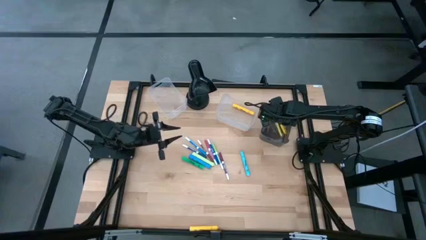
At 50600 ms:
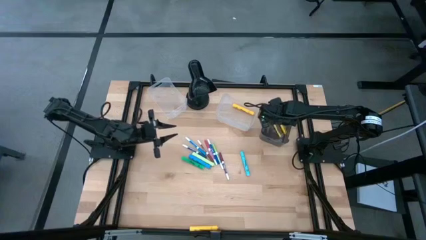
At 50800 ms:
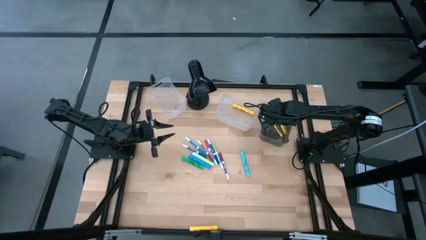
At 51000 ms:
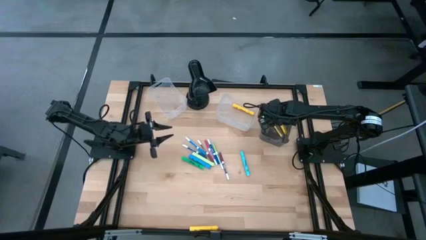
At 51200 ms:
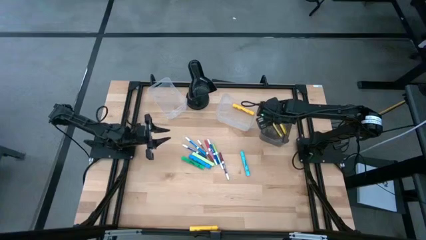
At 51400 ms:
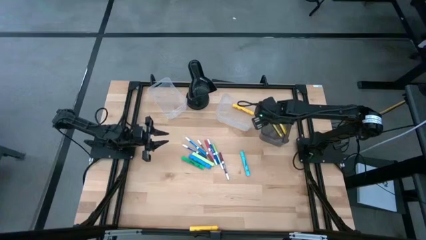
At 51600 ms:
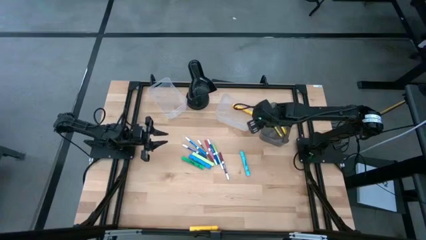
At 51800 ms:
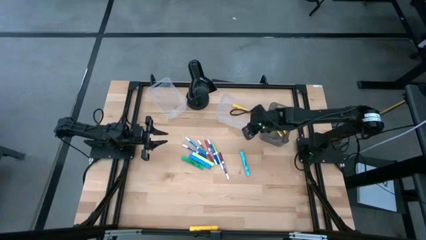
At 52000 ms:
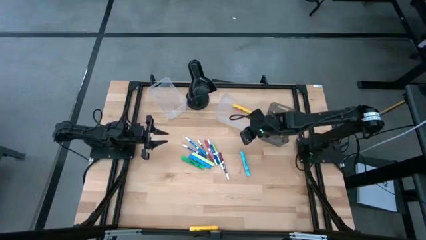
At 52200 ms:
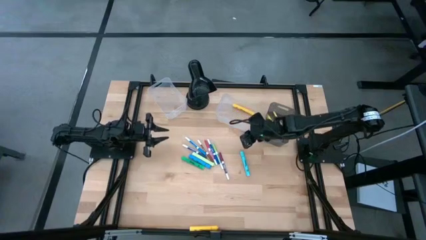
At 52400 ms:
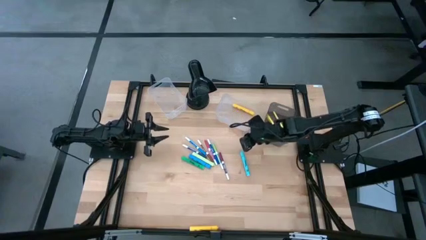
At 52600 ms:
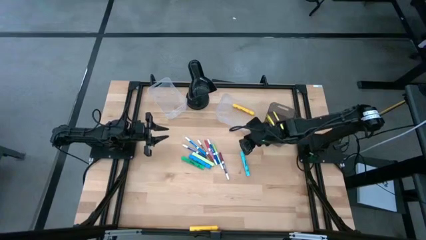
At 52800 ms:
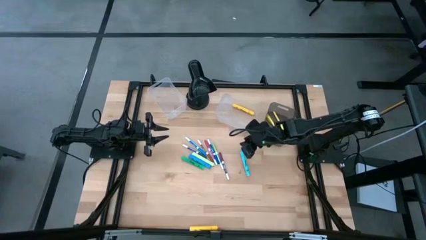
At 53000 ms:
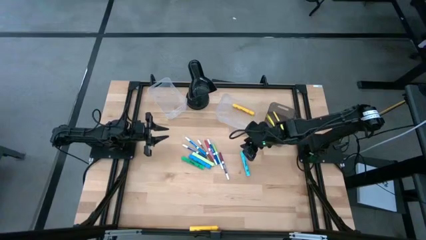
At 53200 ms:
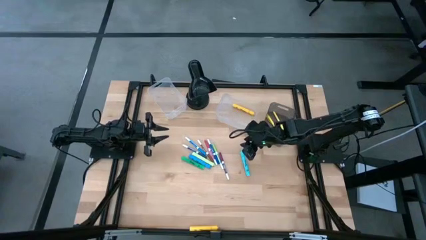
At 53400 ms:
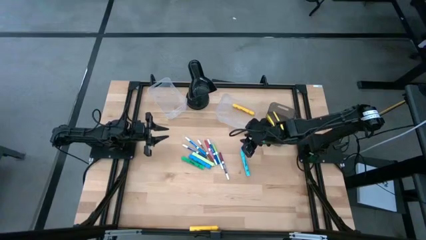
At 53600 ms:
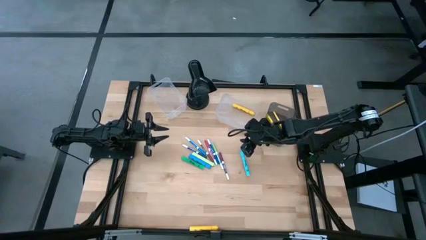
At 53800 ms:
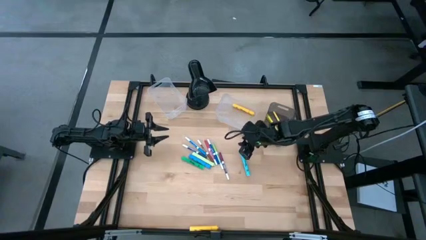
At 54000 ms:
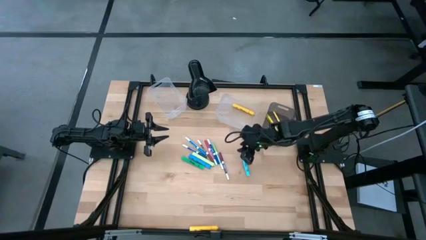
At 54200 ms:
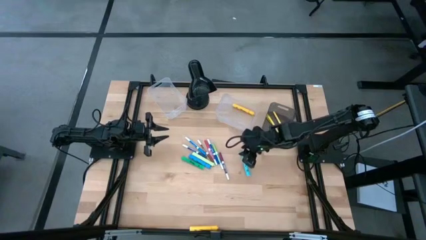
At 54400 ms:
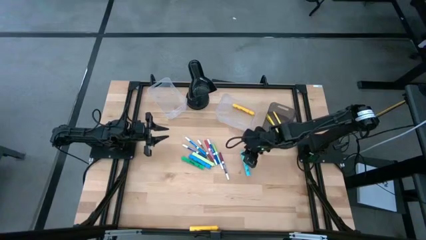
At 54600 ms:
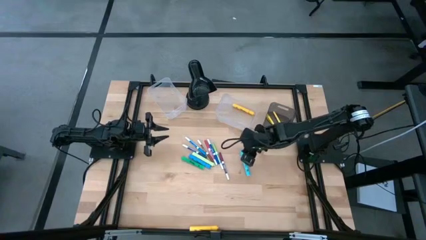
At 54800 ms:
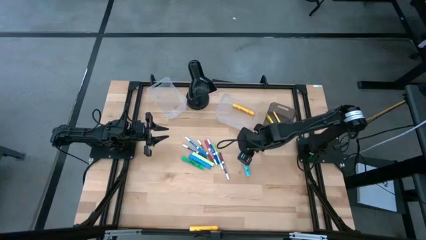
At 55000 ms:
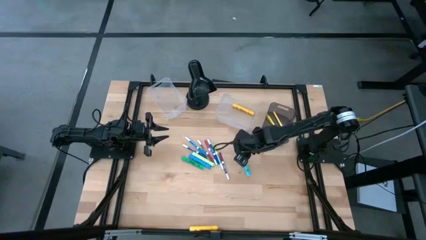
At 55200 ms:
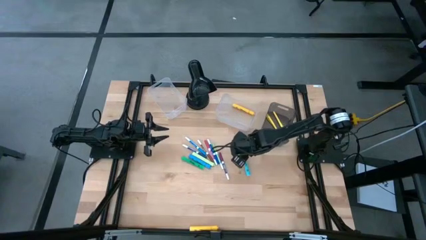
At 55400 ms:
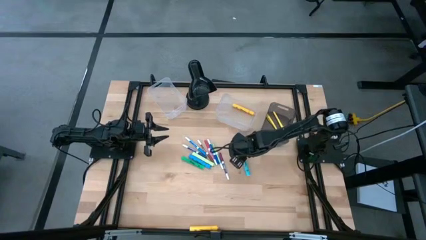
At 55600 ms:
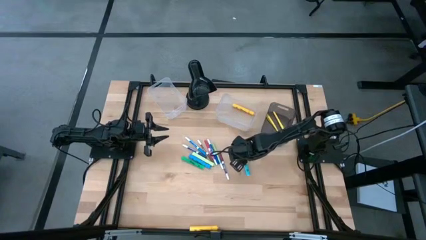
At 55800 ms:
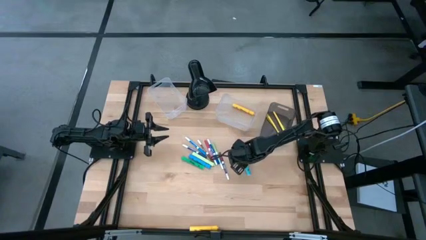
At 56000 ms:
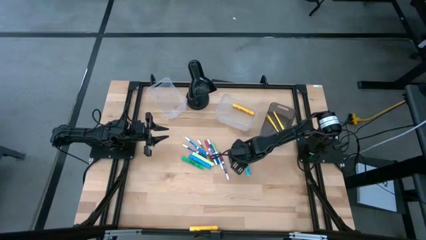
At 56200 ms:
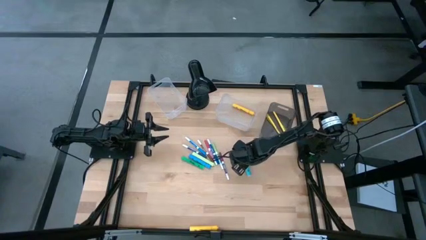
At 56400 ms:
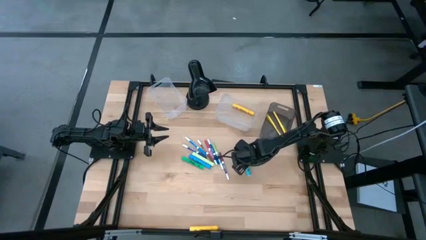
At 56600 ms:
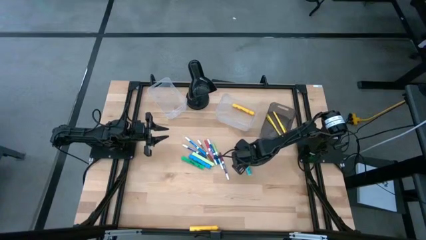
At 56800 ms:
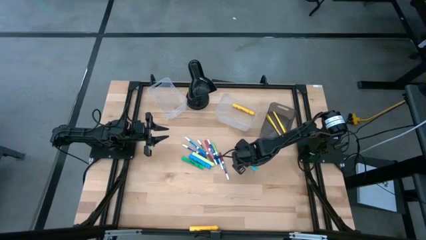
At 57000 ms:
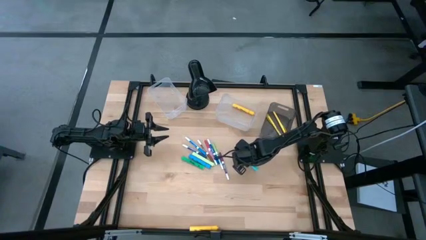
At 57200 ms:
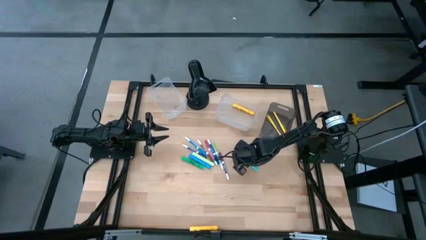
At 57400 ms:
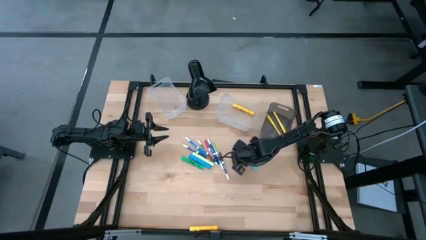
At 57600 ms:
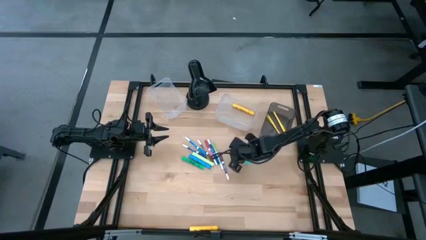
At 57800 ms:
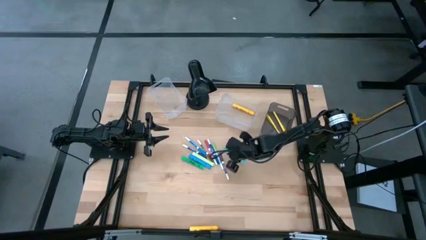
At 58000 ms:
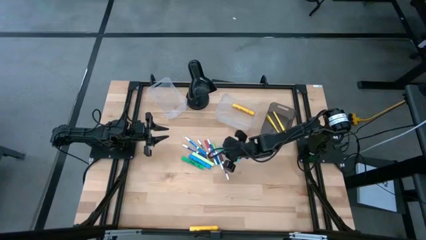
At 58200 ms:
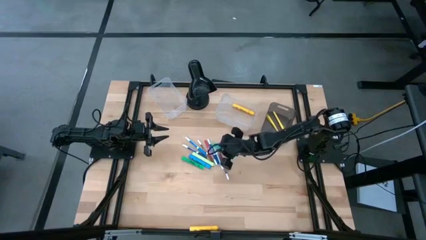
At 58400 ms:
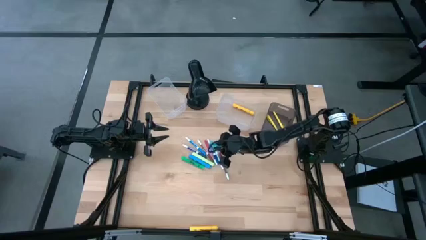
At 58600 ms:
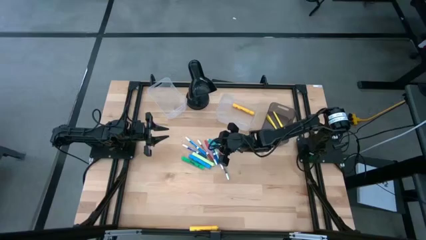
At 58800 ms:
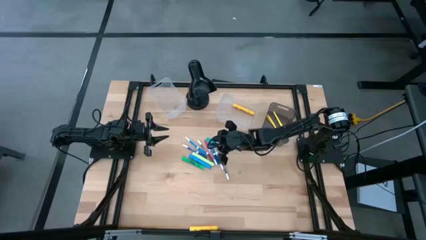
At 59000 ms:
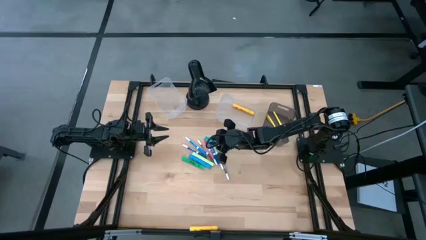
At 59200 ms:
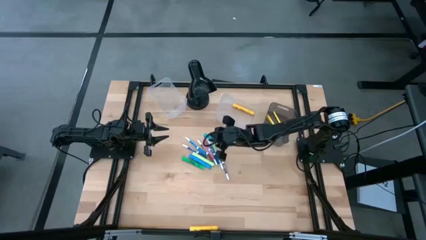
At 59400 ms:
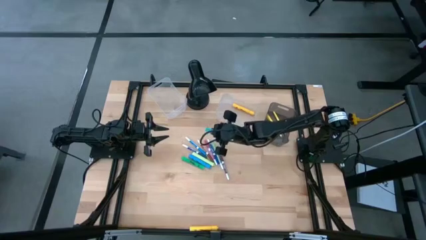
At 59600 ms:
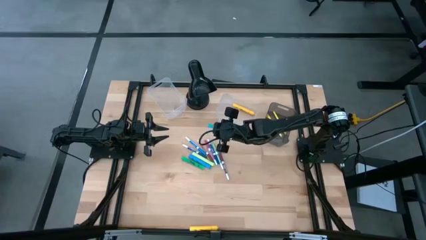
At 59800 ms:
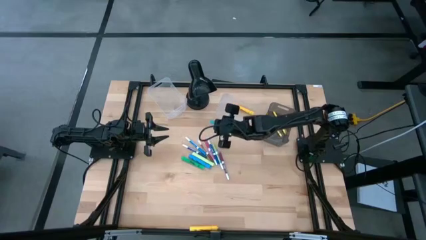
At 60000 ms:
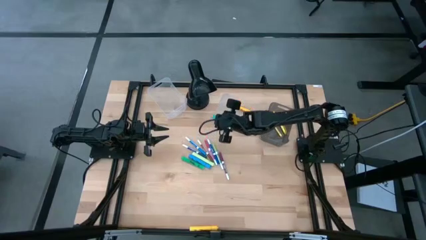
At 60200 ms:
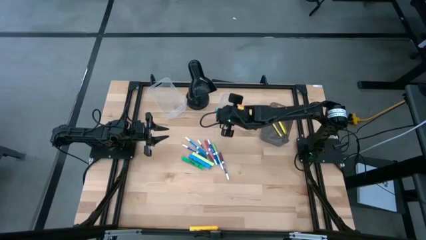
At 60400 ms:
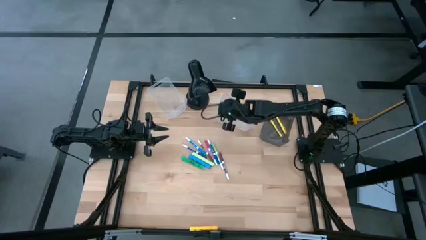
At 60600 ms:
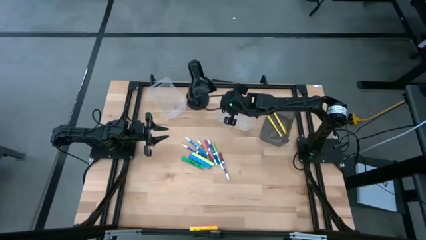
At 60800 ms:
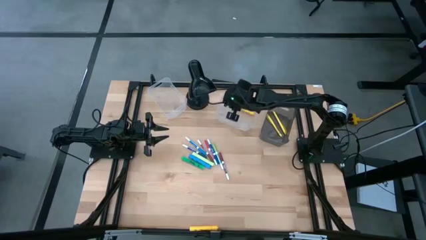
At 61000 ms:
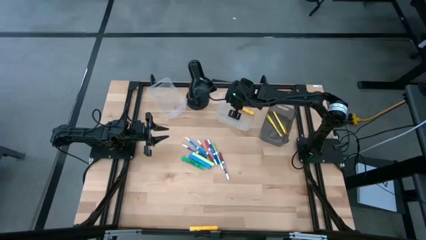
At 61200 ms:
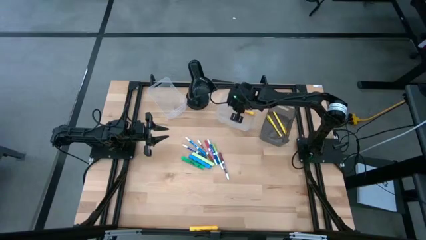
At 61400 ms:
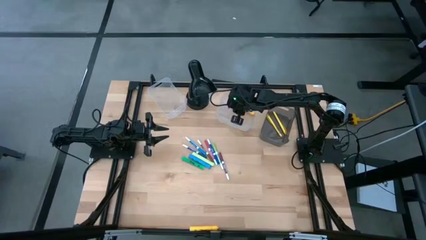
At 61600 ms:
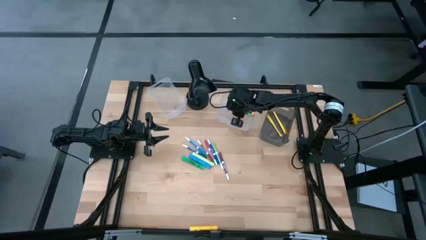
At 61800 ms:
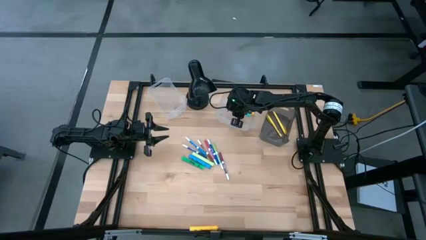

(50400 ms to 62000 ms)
Task: Pick & Place Markers
Put the light blue highlighter in the right transparent bin
